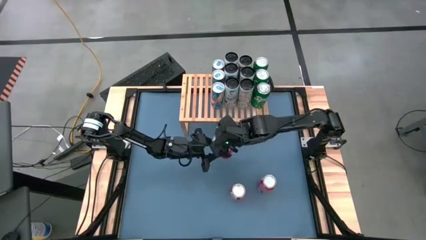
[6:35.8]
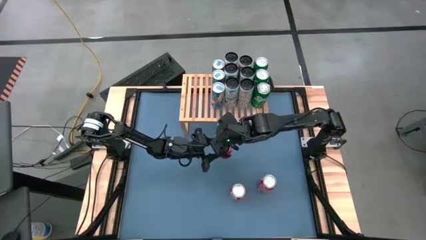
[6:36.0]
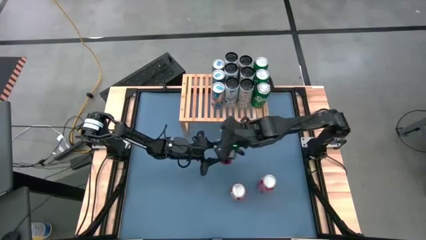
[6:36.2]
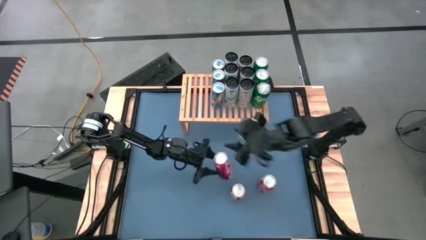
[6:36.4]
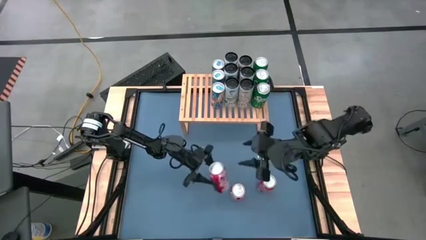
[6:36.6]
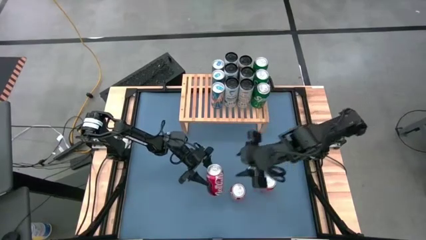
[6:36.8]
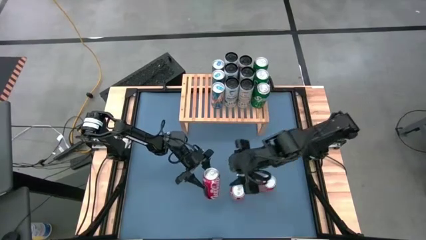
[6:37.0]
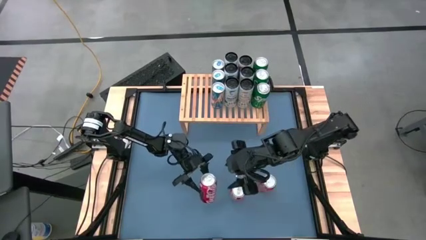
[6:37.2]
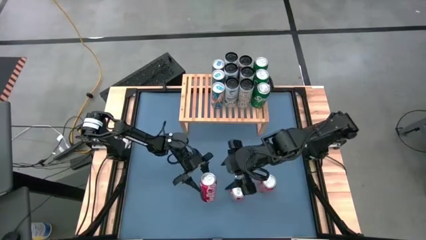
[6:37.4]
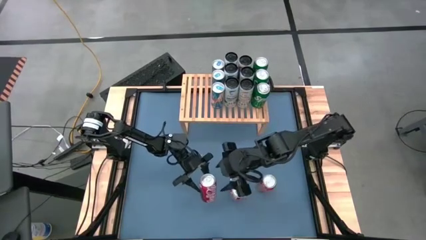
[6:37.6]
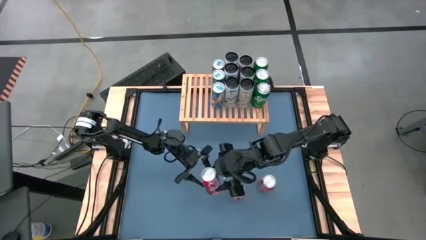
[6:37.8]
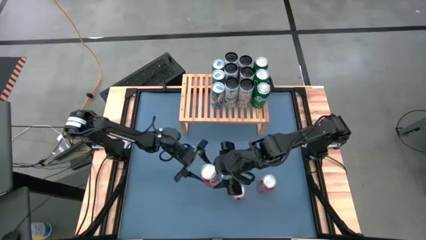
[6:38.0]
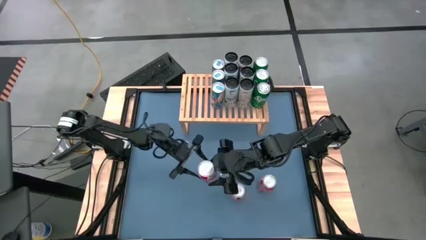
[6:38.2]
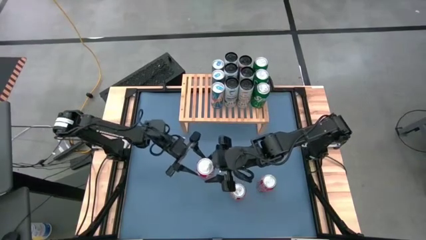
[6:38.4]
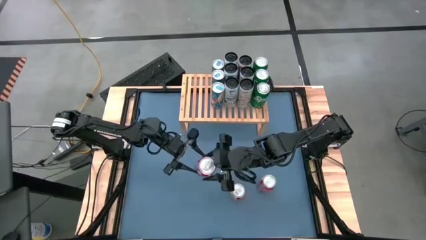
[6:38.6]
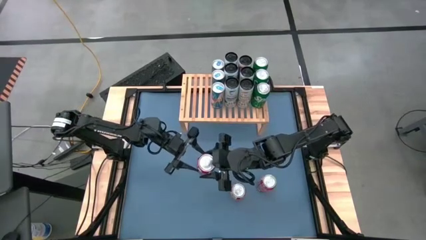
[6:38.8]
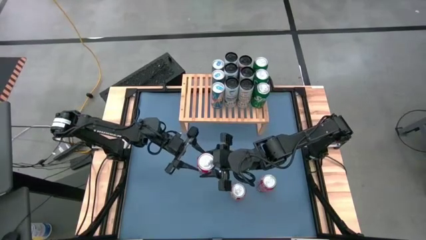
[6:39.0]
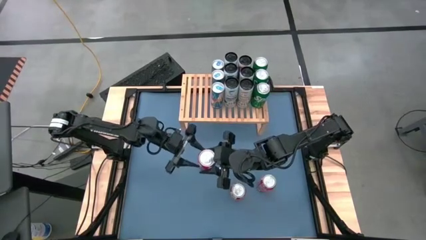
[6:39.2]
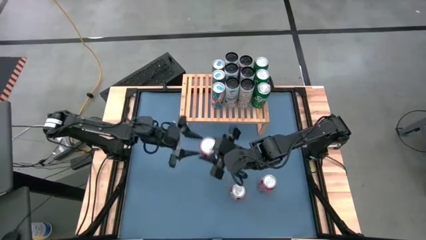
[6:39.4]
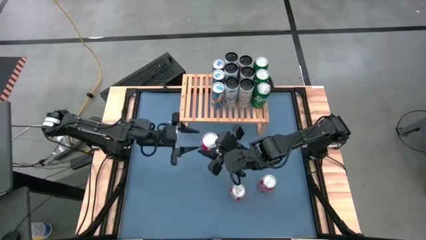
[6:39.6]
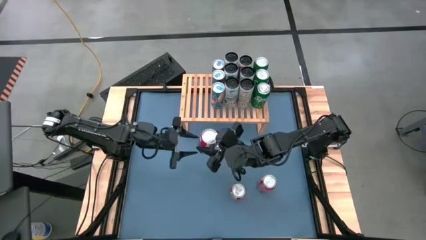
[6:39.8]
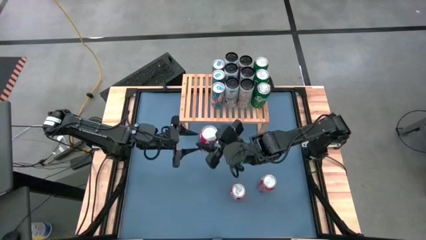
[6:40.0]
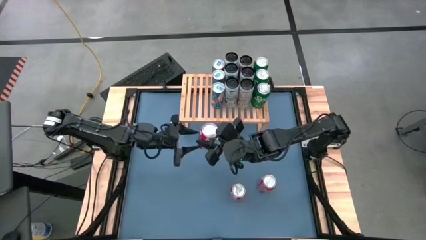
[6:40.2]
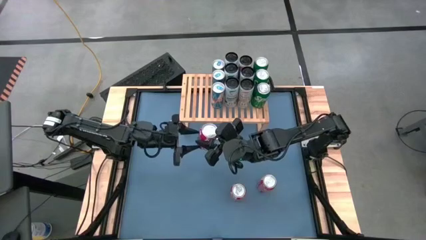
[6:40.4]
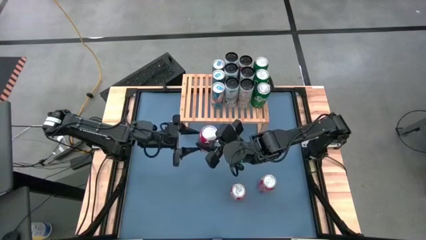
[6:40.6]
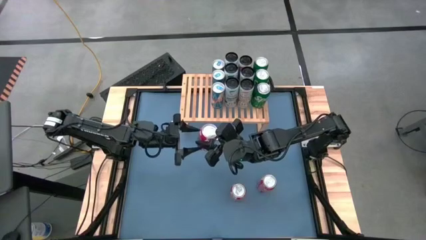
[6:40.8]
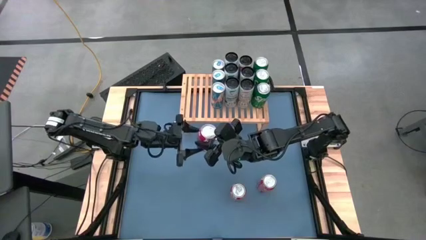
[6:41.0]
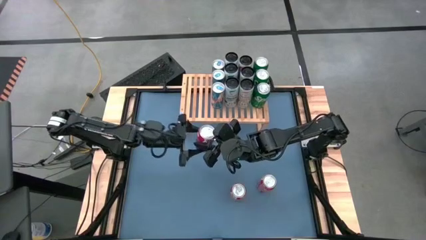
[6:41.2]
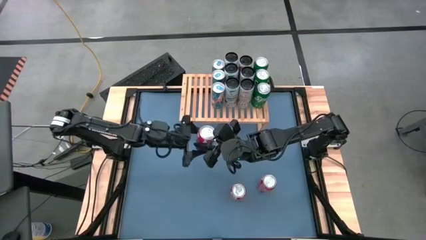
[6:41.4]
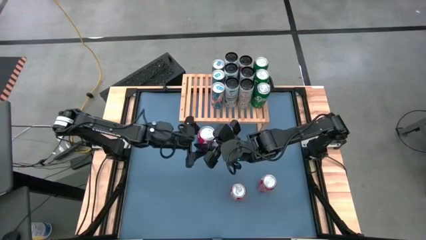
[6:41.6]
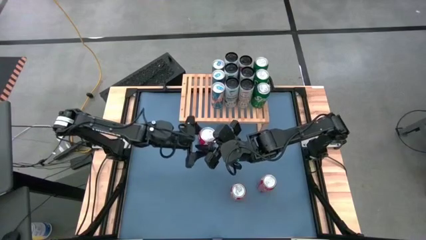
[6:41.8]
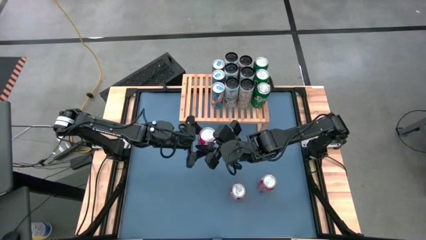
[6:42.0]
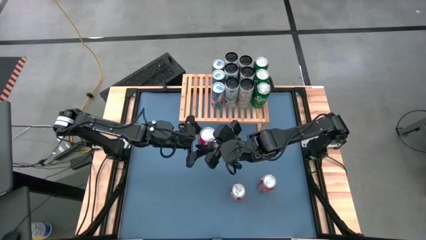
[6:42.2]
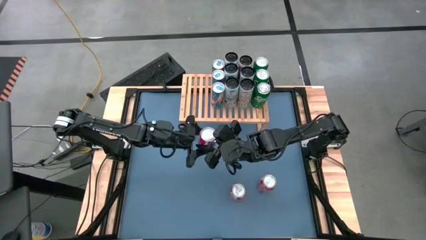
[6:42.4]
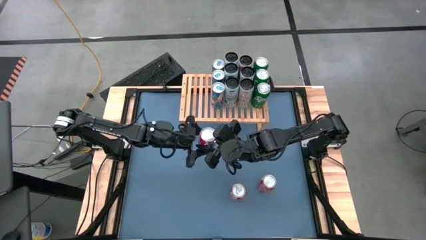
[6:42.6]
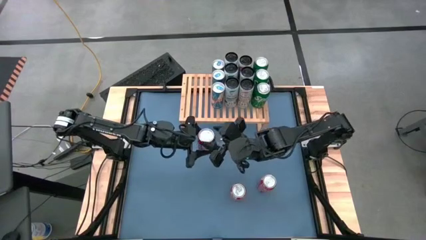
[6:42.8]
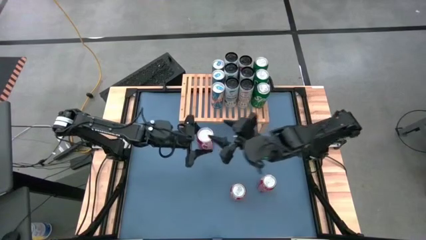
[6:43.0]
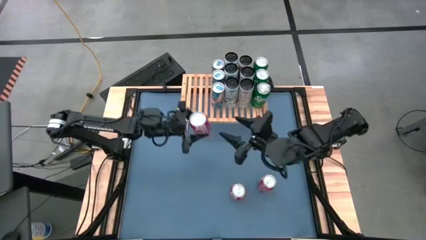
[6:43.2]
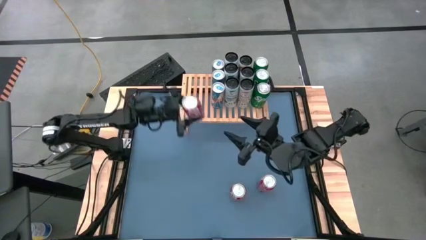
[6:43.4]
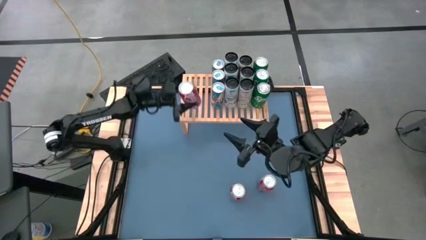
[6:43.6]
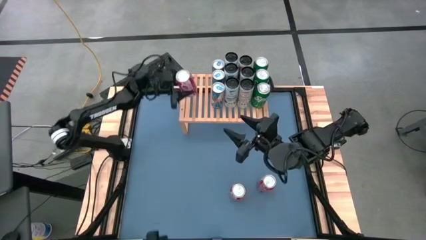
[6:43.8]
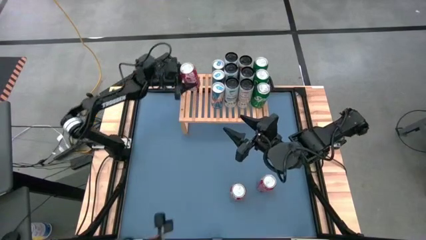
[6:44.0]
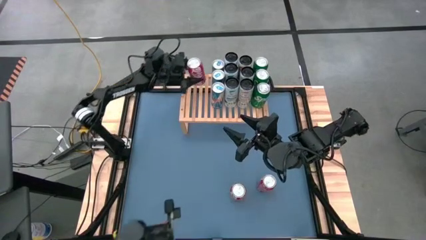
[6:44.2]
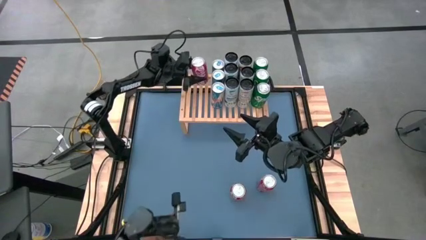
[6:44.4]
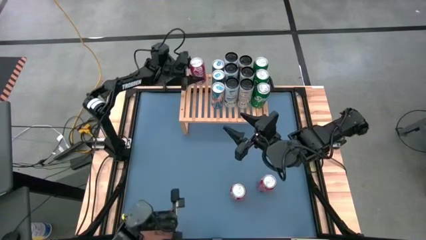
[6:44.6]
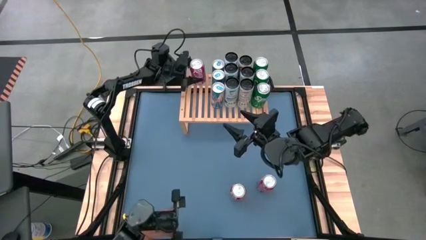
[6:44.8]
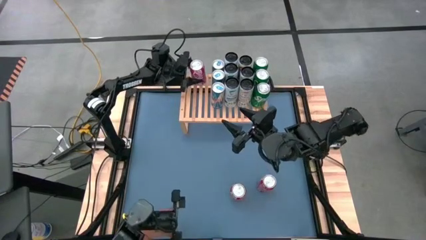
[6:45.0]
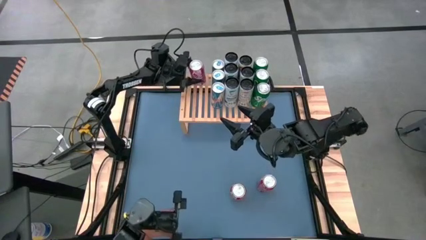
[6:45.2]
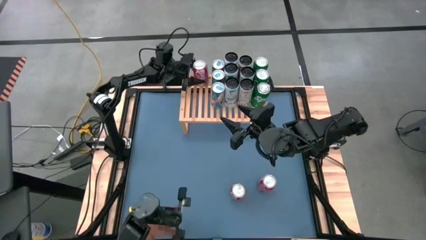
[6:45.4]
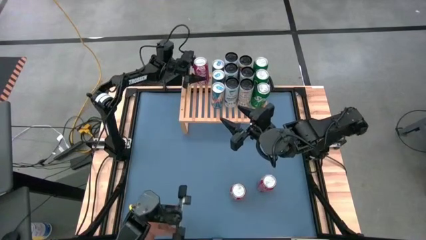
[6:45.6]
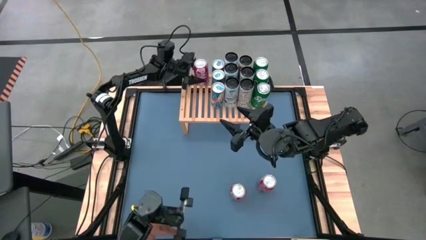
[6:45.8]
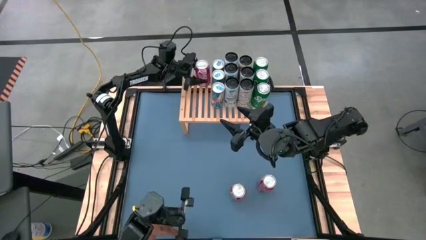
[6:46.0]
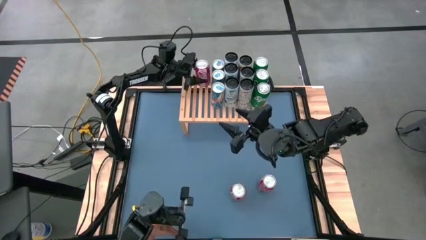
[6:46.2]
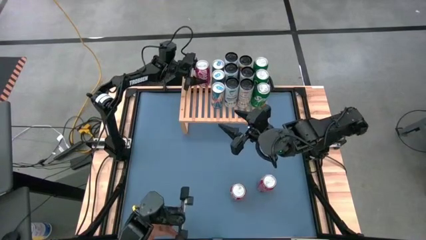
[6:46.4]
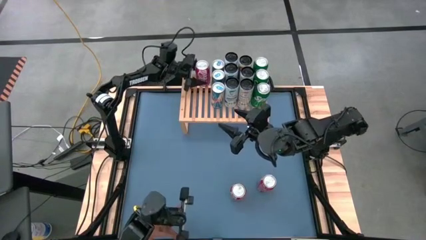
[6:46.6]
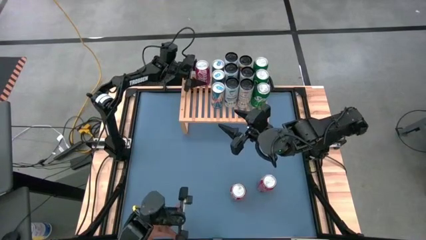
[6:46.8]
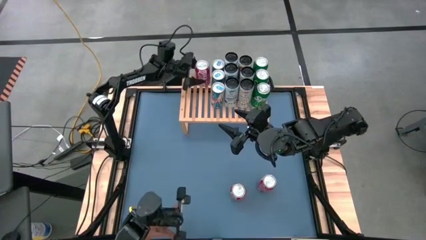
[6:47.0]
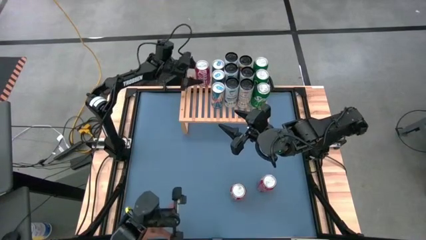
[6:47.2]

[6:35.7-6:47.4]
Task: Place canned beverage on shelf
Put the left red soda can on the shelf
